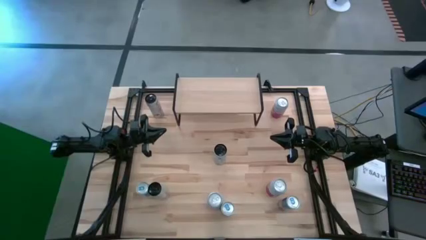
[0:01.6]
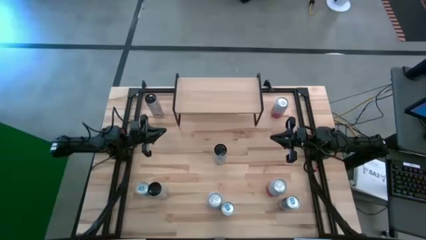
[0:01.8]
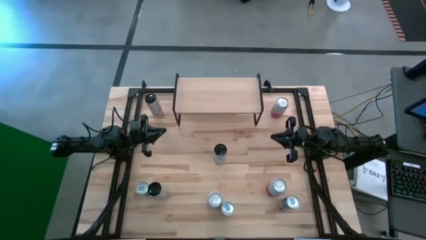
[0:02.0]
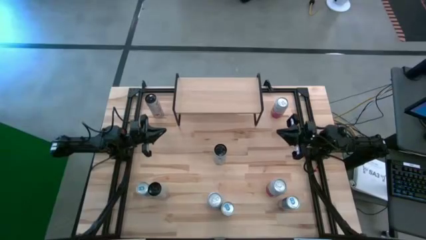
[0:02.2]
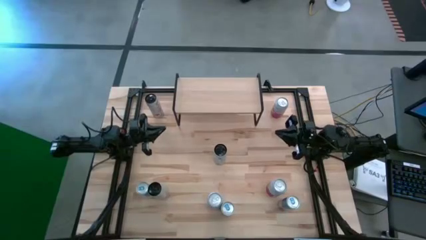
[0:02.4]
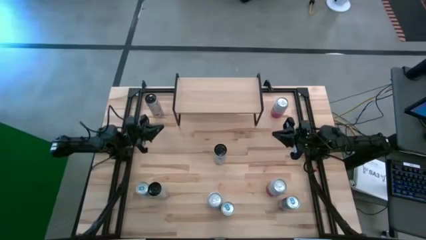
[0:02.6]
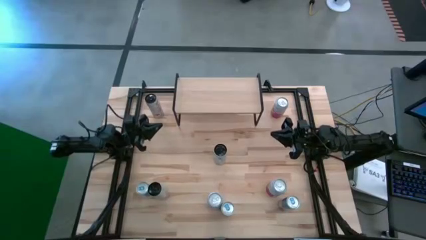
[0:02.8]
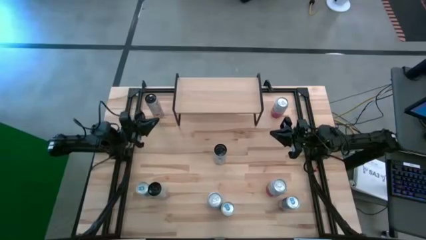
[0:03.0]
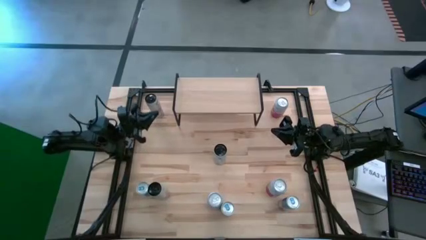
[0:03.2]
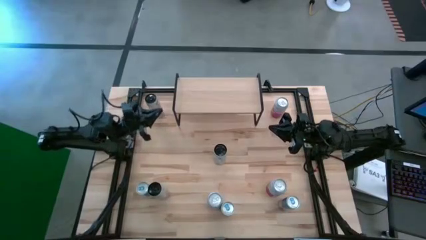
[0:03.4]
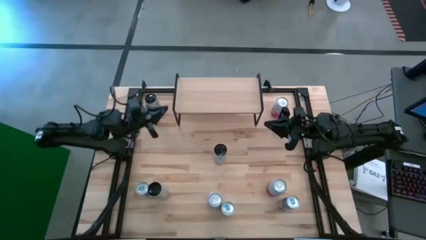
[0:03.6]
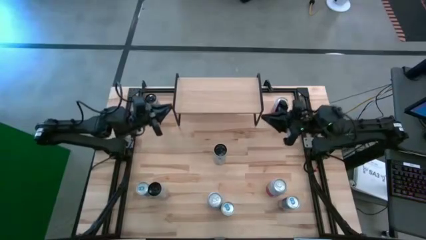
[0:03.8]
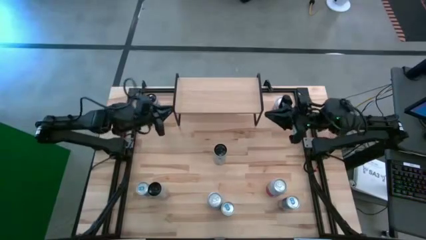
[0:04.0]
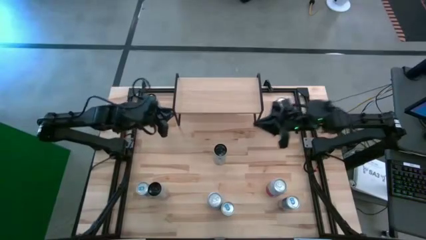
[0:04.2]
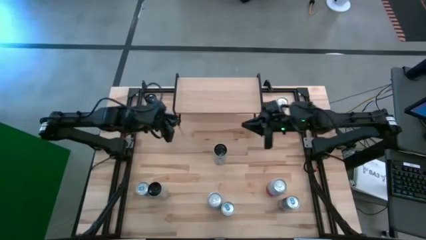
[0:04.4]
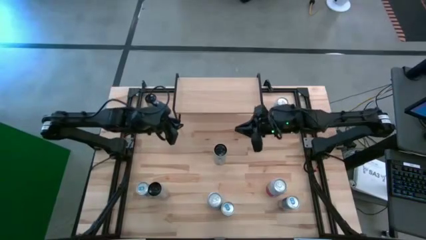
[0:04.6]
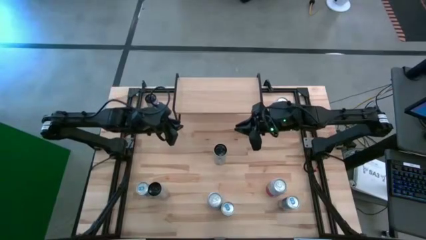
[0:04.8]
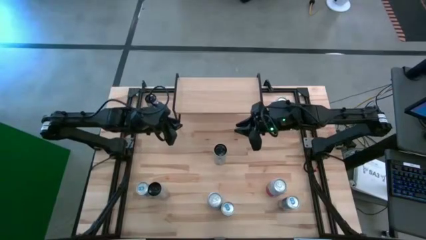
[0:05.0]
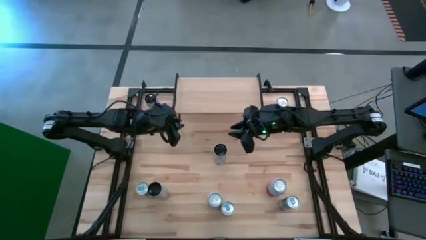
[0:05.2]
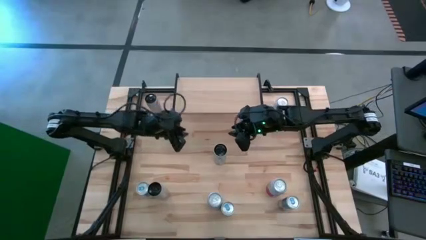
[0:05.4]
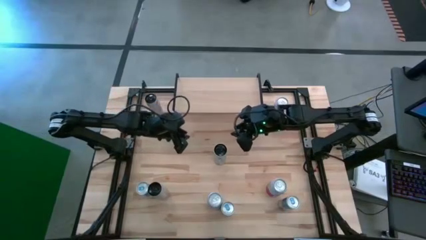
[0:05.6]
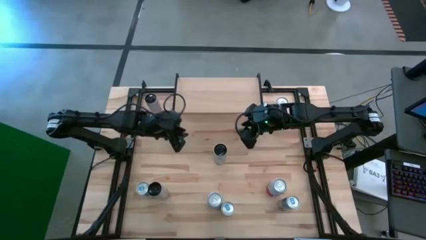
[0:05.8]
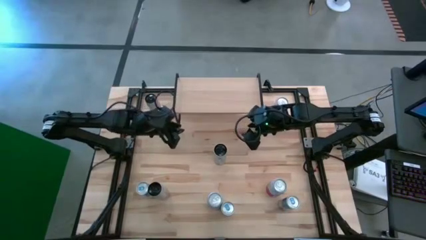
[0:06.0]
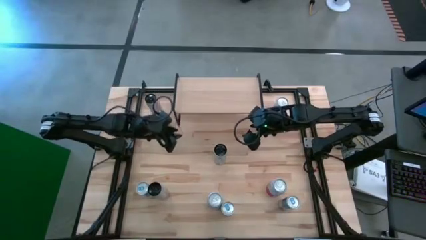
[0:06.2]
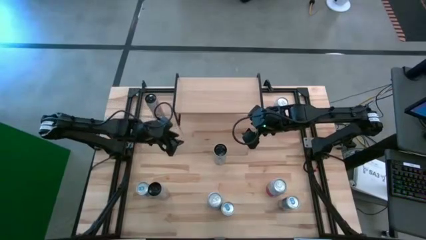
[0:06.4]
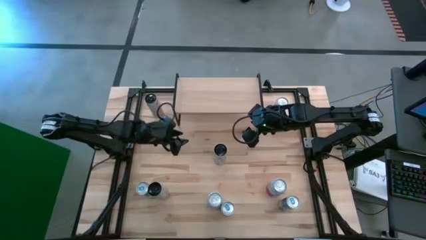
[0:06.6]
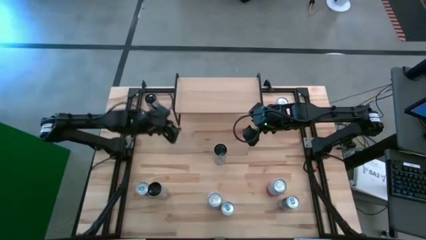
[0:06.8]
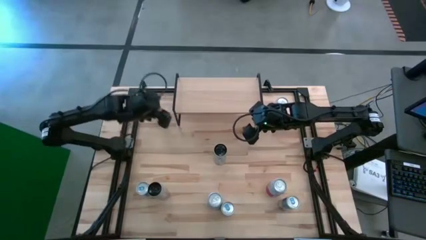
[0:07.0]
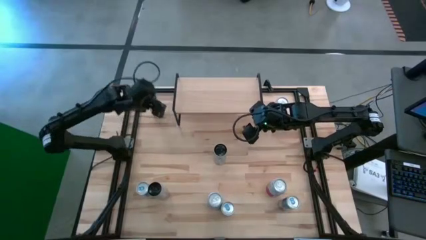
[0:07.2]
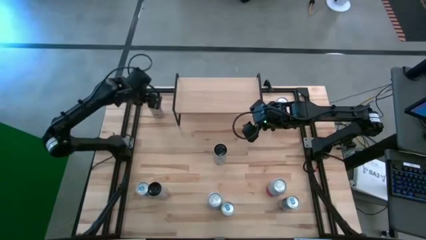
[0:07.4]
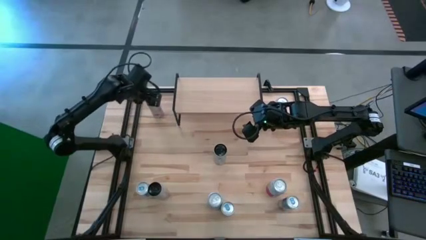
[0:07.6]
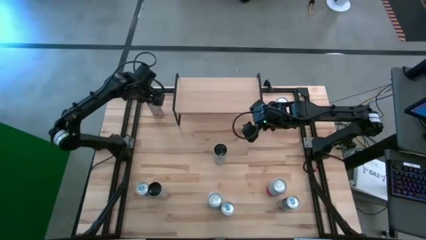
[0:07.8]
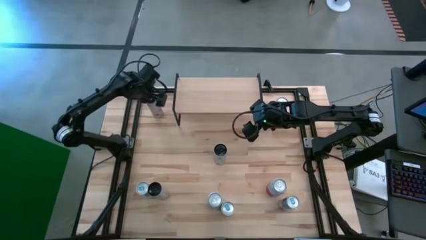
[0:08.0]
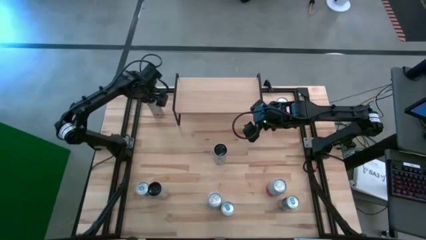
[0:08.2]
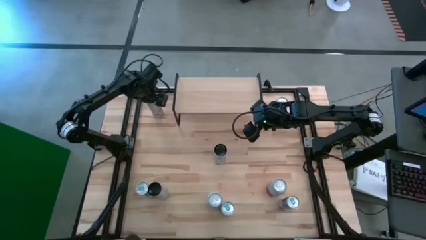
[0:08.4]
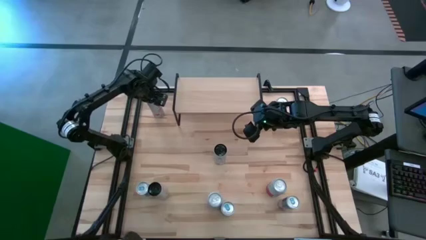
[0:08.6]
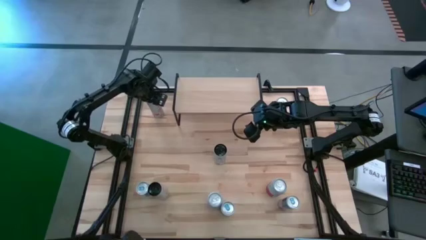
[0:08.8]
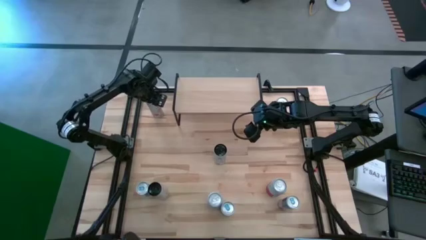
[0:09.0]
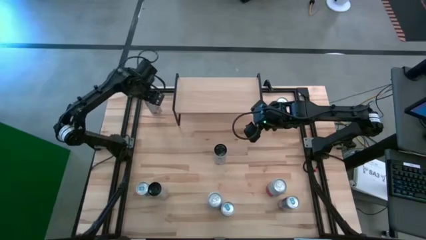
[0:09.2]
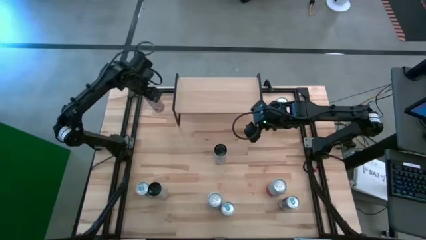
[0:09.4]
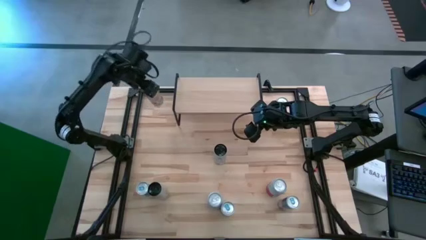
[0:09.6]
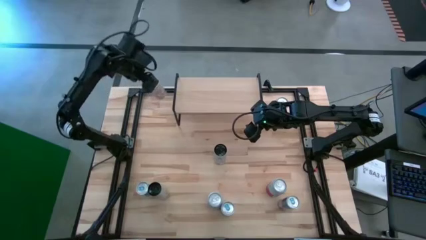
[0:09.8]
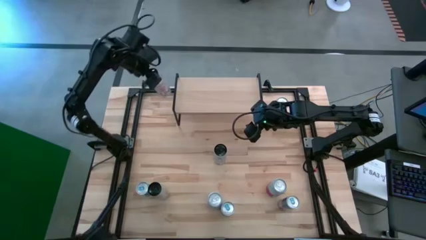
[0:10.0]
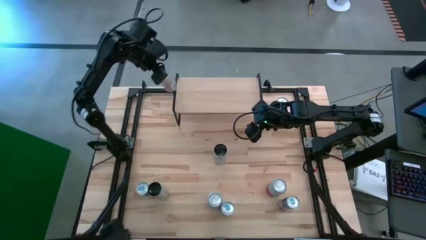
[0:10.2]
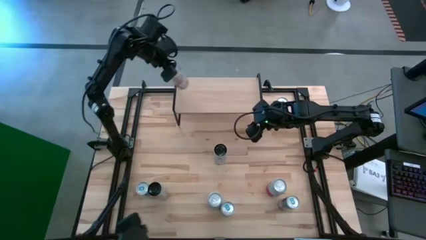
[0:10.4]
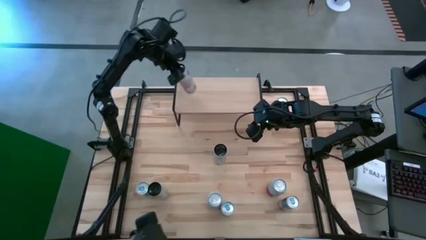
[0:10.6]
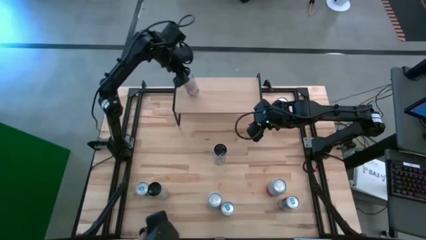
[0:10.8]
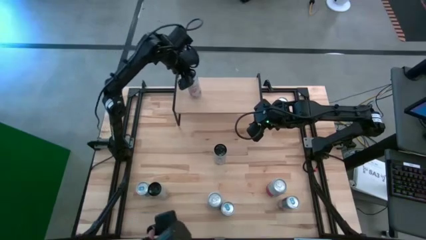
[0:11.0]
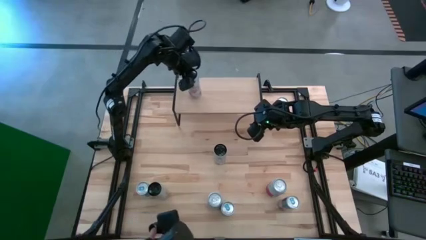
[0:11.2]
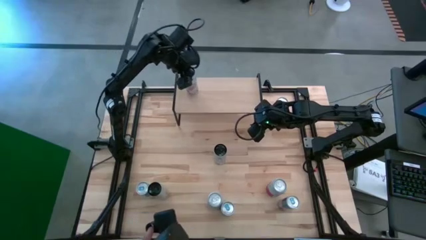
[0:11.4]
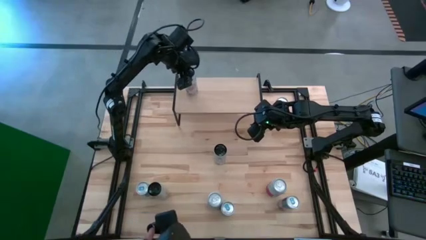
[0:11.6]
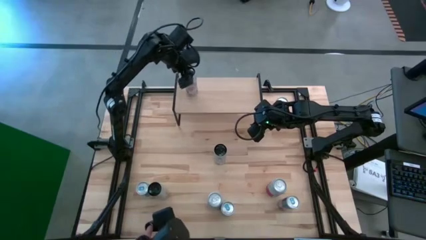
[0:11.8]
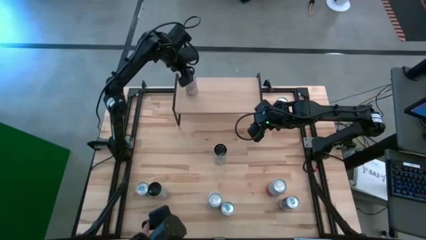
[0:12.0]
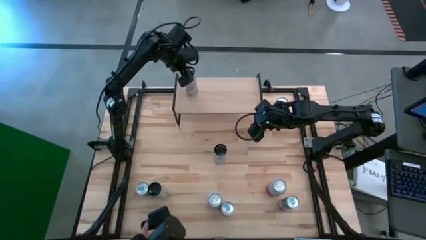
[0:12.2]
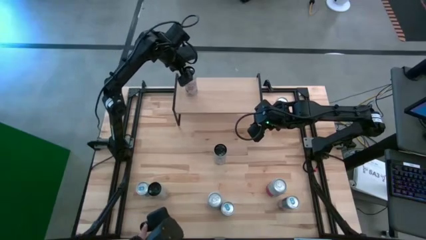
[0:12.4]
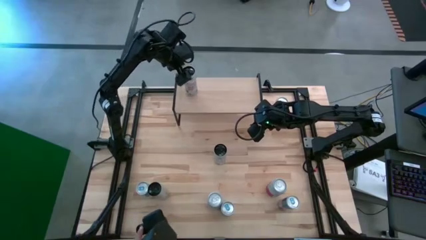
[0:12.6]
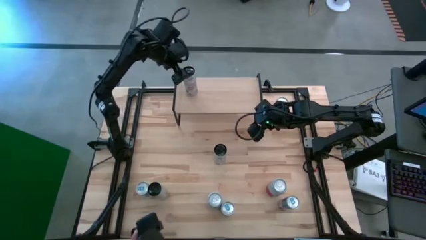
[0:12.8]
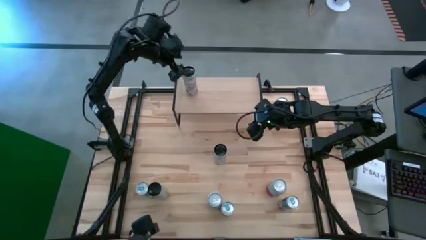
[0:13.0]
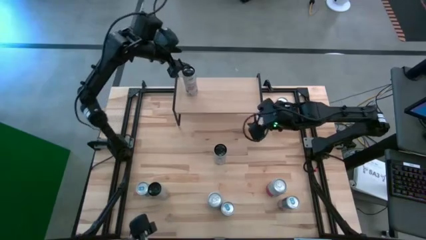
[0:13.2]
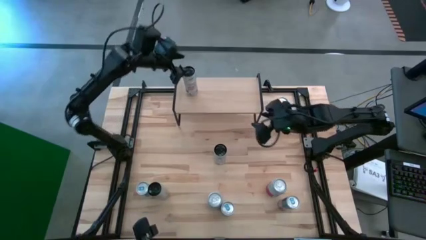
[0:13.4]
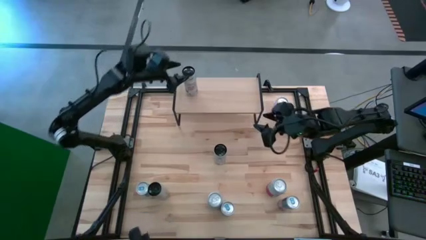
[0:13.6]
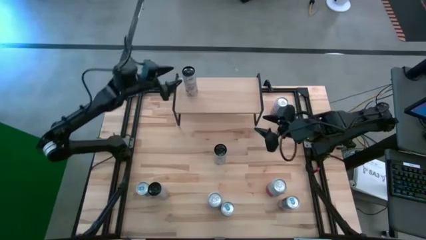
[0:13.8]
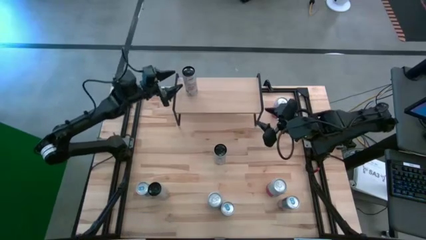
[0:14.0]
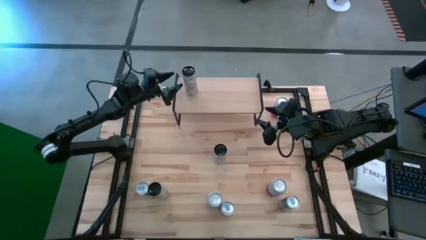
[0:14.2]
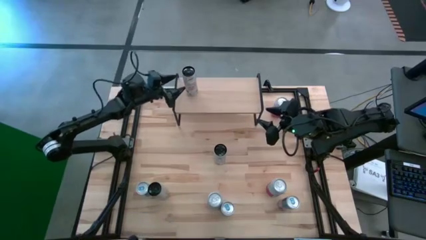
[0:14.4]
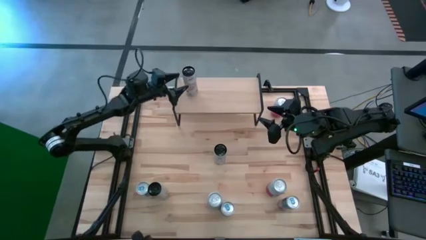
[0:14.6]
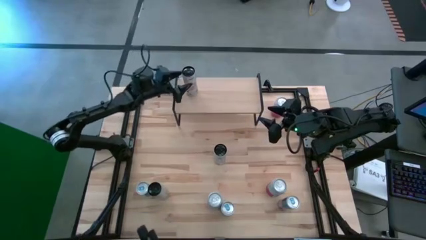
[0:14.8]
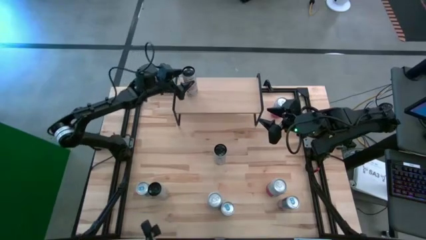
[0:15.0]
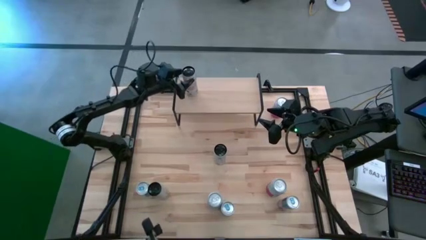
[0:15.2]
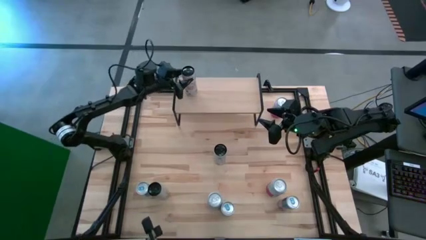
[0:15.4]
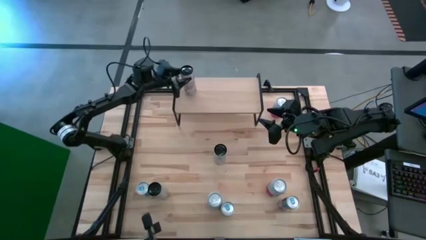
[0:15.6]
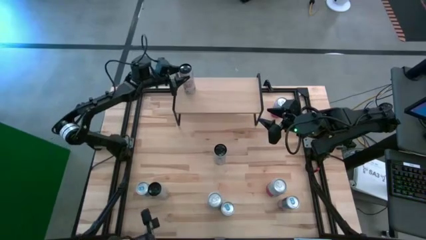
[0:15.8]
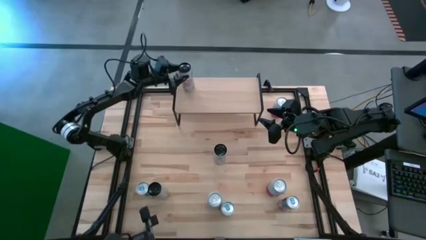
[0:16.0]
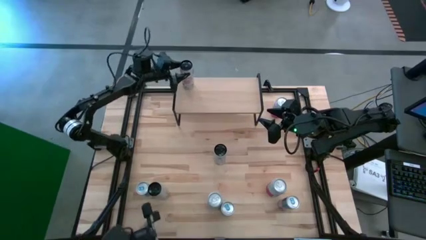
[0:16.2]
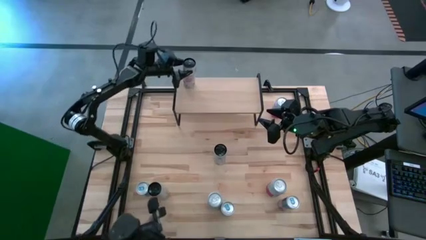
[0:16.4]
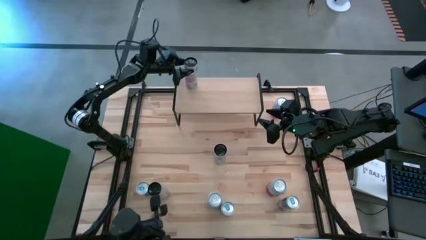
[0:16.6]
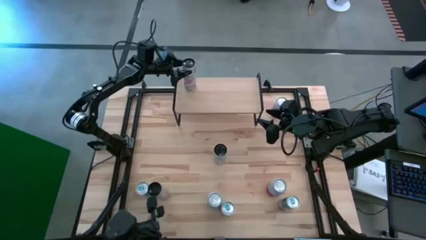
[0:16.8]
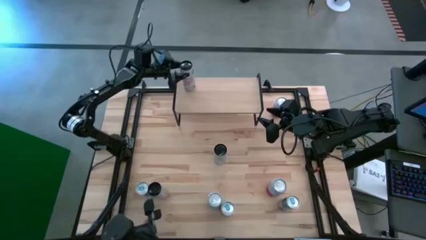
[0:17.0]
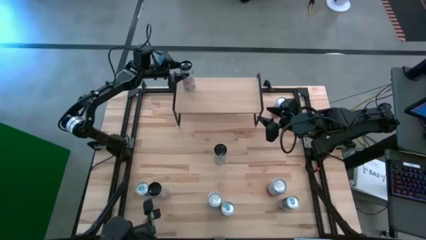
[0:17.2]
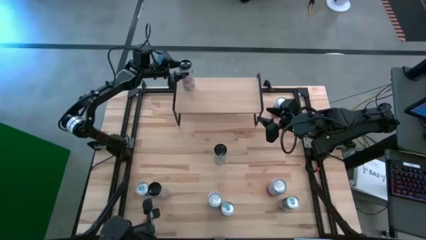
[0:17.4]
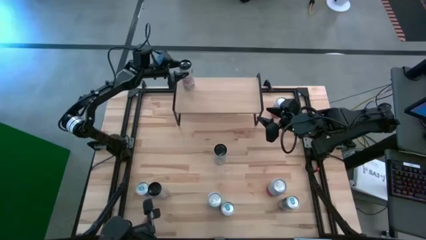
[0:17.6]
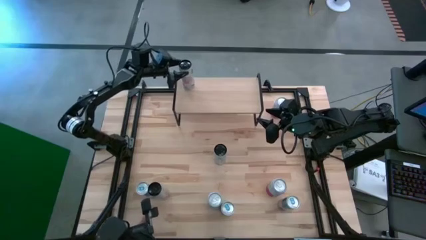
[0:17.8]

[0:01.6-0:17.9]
Task: Place canned beverage on shelf
Put the top white-pink soda can on the shelf
